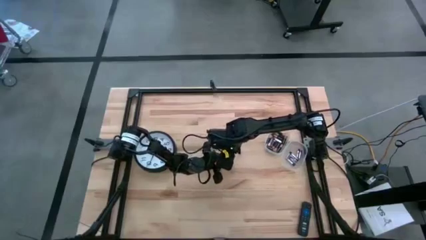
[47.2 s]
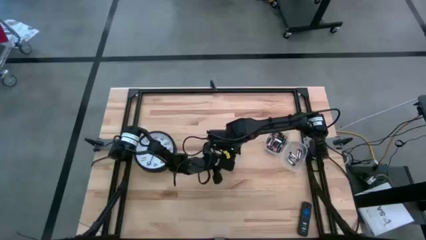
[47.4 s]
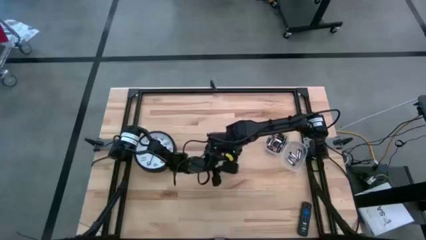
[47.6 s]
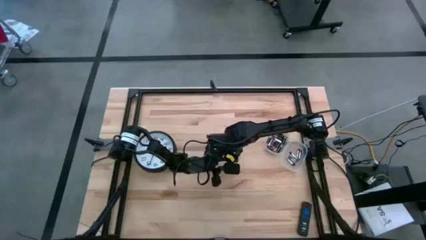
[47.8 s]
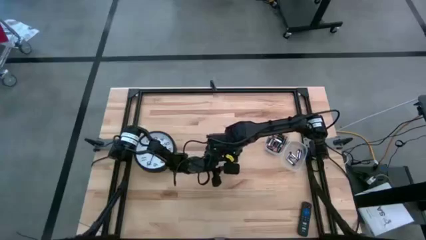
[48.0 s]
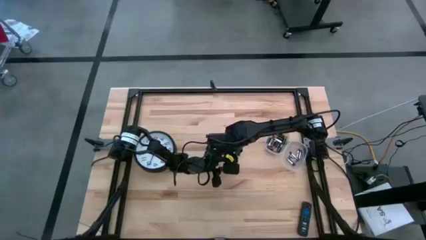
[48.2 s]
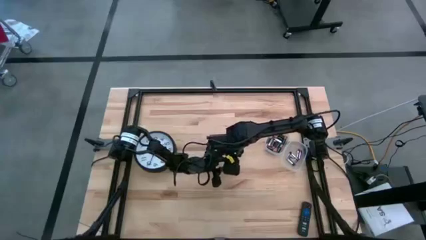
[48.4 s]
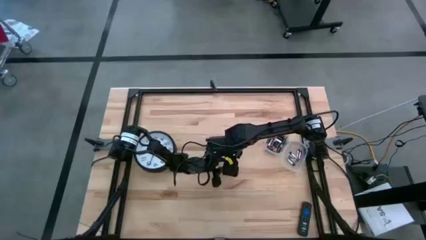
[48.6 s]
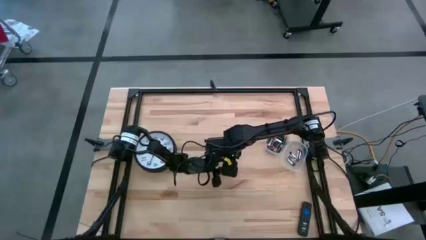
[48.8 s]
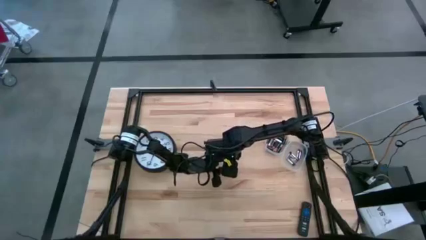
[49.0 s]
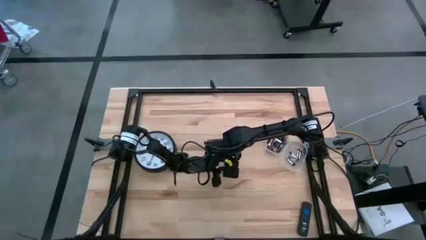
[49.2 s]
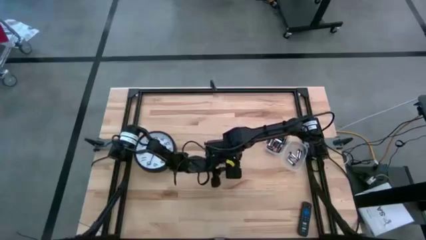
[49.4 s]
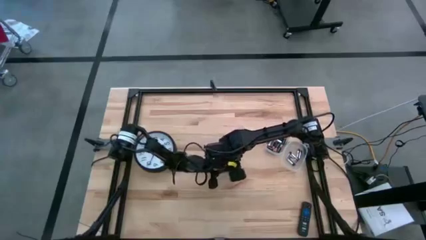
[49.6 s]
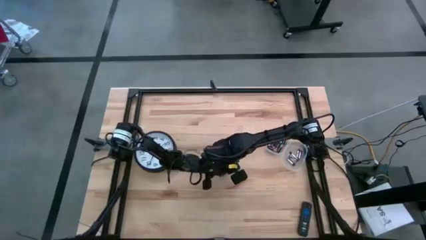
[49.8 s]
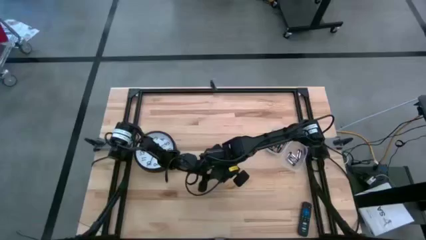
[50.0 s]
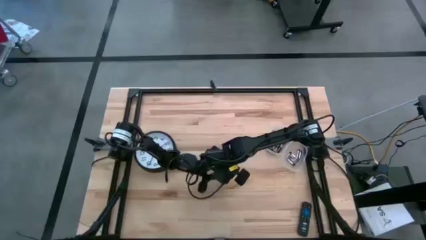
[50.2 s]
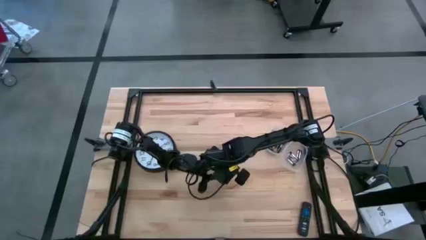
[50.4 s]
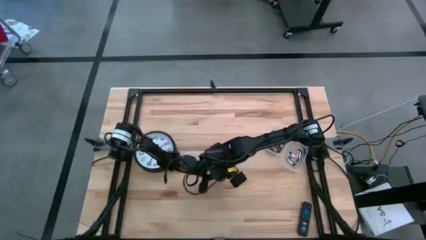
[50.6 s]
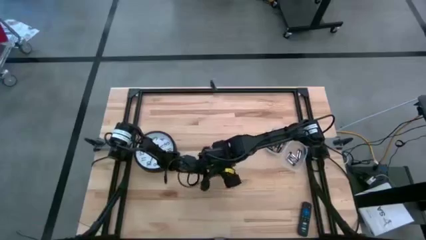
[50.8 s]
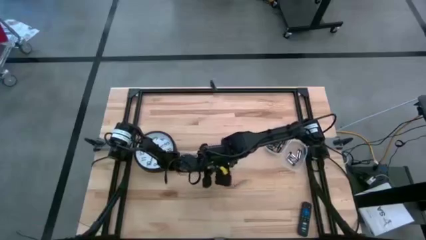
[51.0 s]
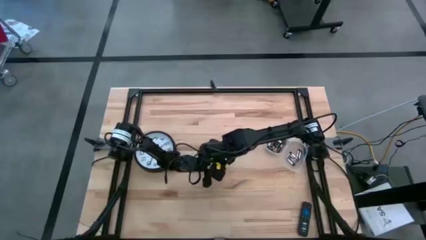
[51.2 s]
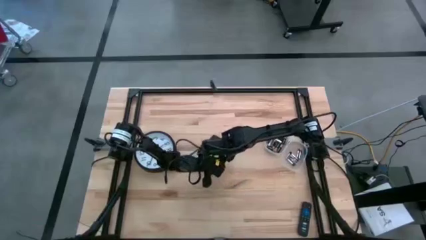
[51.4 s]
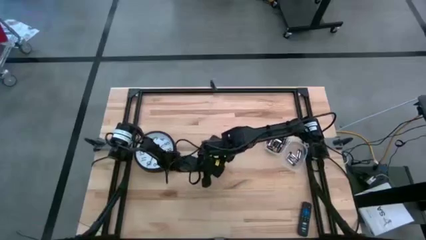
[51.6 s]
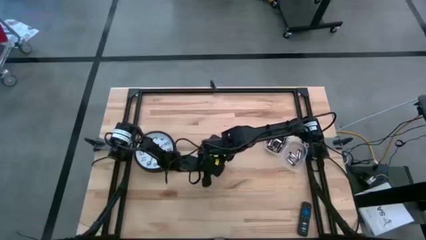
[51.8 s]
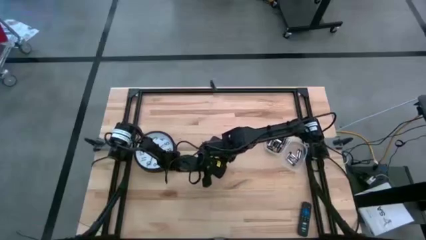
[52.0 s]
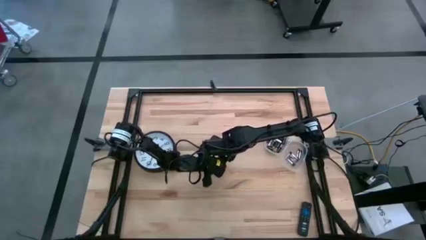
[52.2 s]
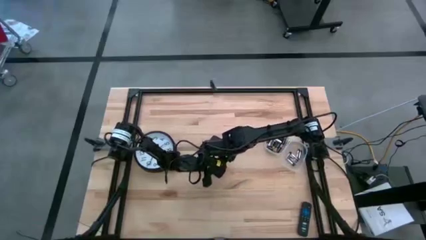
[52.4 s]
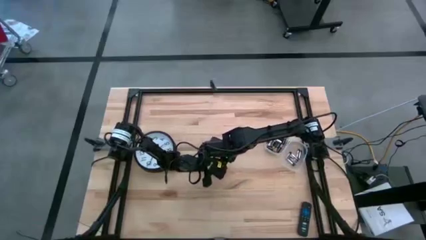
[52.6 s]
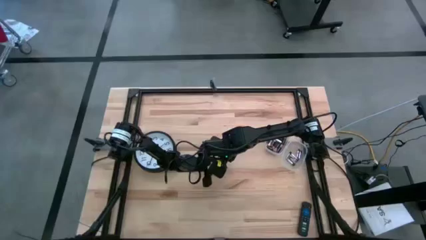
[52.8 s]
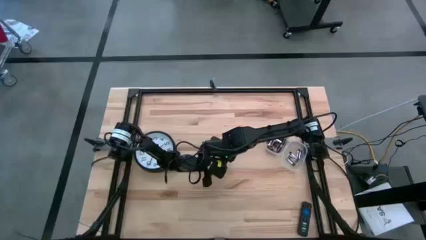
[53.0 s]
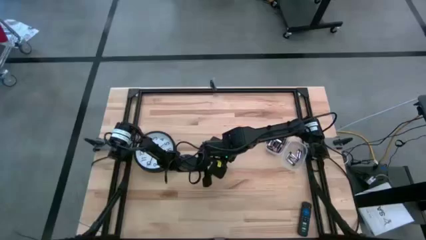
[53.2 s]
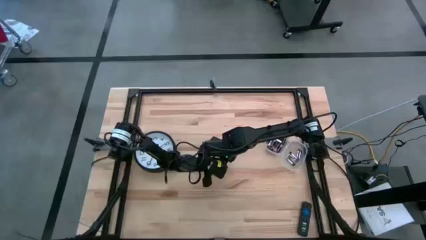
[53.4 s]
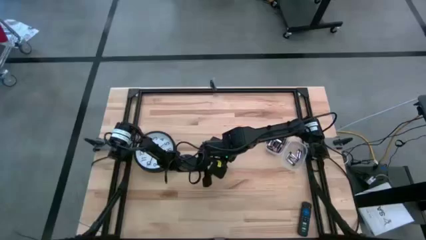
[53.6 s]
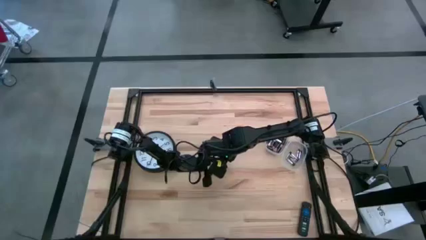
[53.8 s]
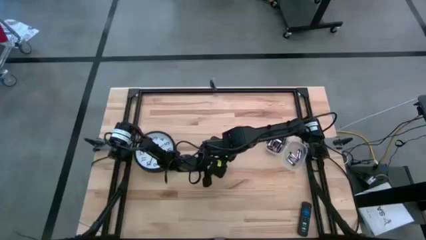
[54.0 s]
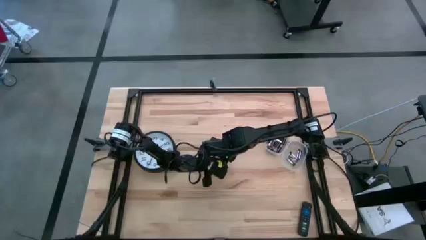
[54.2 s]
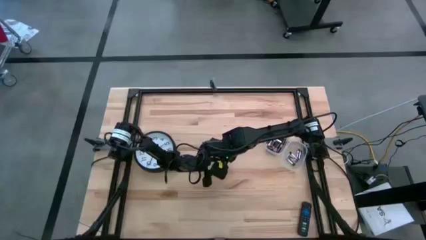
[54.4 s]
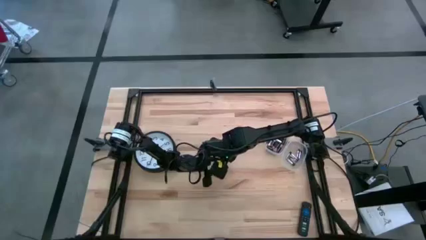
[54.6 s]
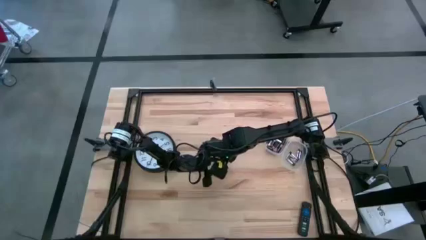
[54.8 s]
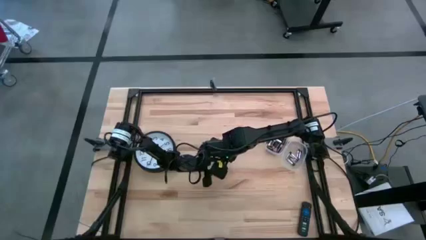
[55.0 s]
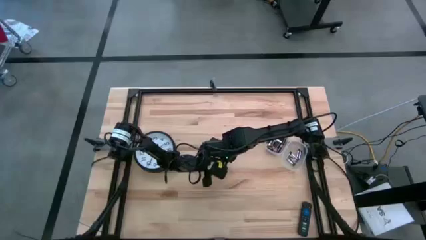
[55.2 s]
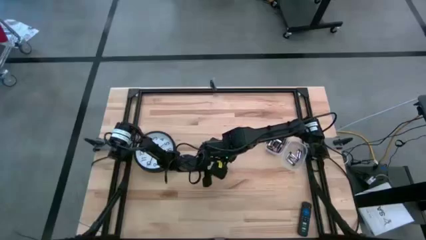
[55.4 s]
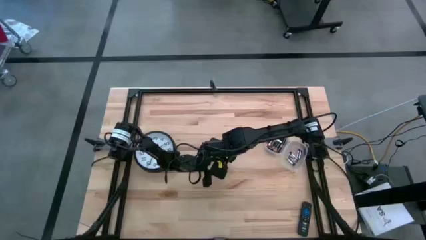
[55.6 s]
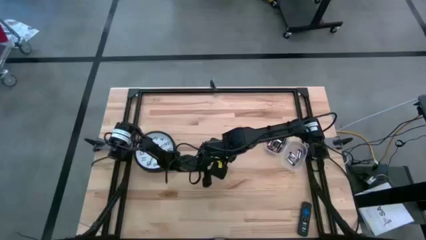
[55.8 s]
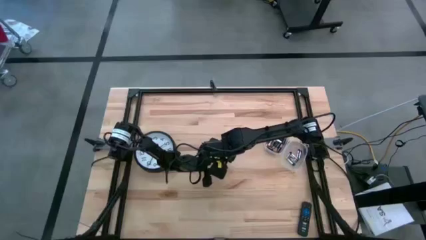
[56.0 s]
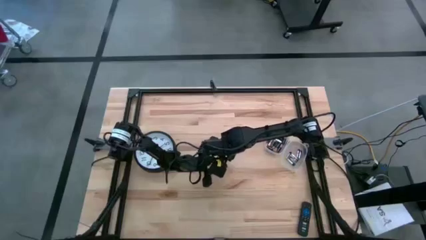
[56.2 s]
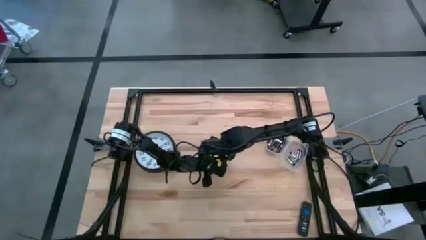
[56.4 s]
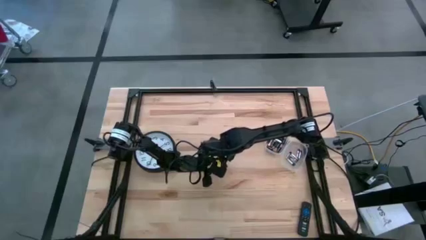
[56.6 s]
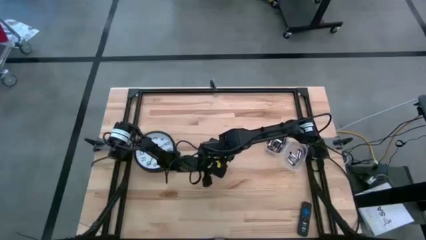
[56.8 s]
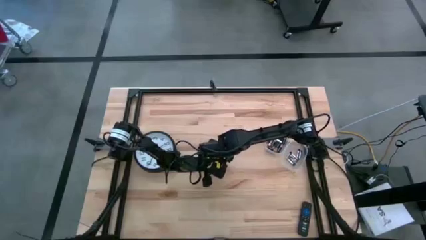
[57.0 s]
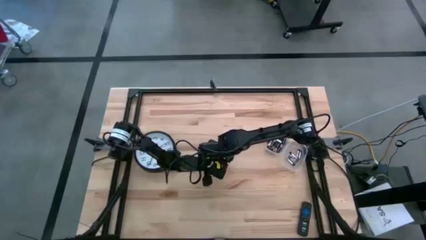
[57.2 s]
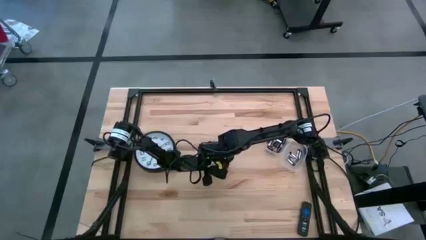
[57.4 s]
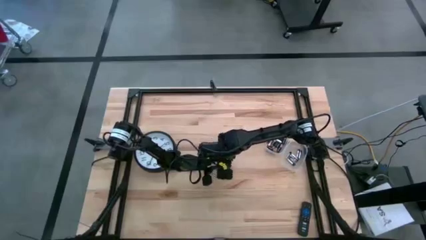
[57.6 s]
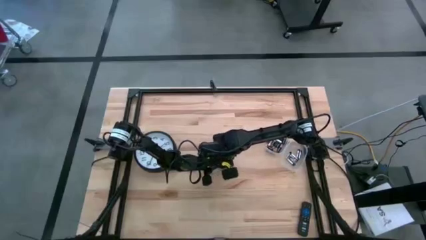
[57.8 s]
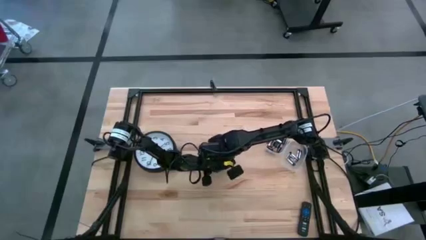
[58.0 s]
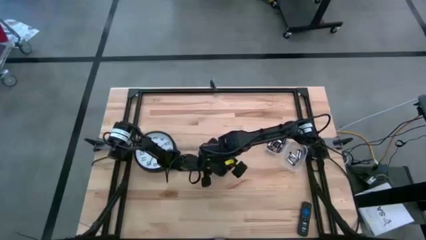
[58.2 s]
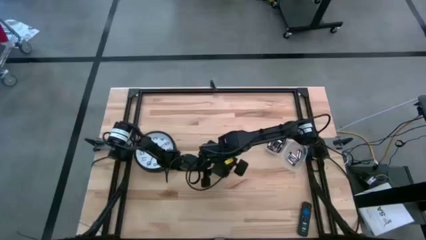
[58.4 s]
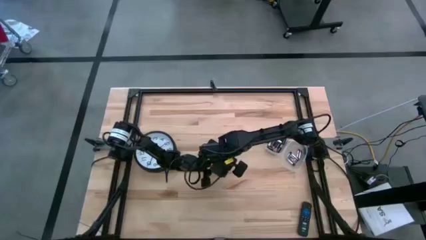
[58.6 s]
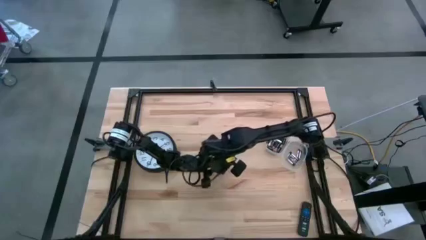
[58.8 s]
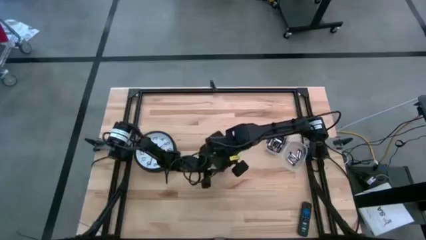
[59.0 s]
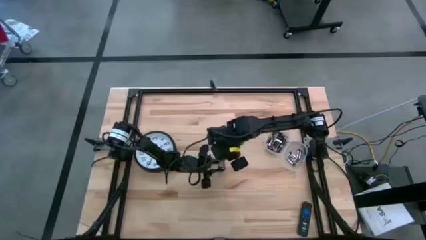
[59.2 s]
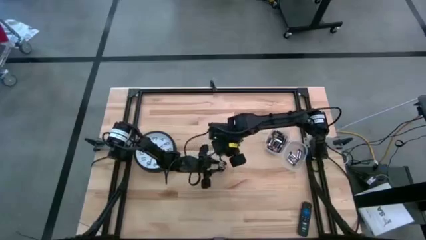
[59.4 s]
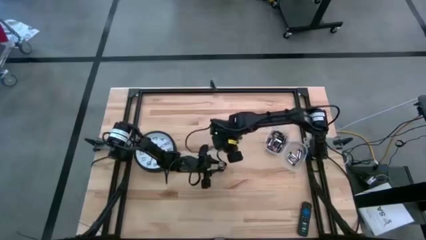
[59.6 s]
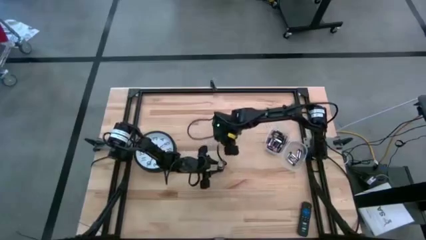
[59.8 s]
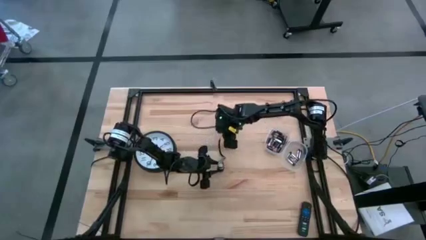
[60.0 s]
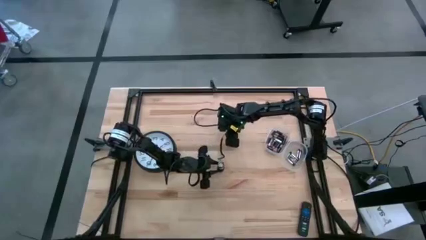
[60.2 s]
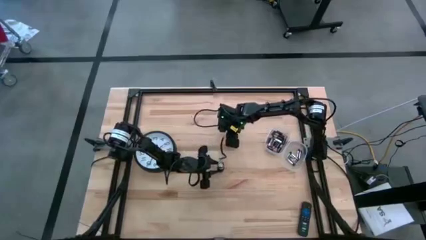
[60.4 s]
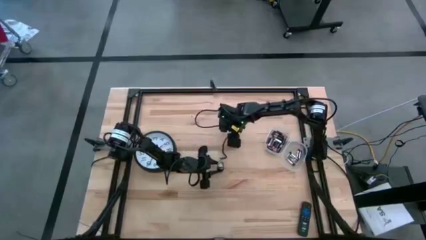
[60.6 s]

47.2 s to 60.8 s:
Task: Insert battery
Open the black flashlight battery compartment

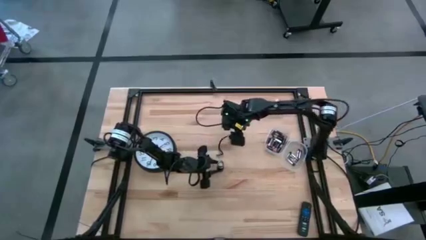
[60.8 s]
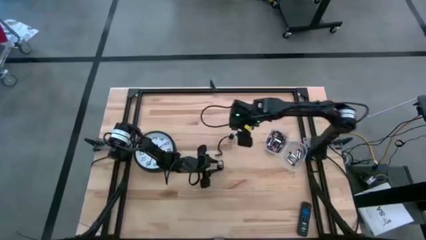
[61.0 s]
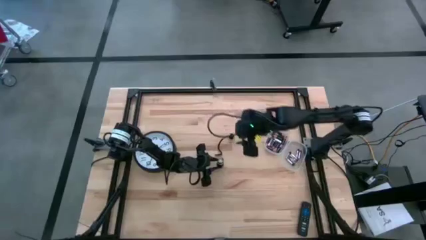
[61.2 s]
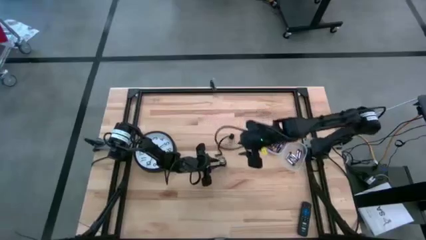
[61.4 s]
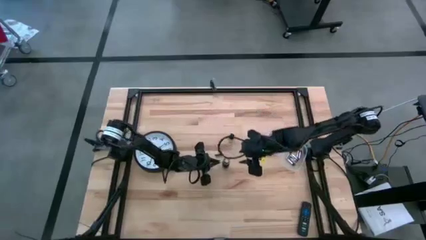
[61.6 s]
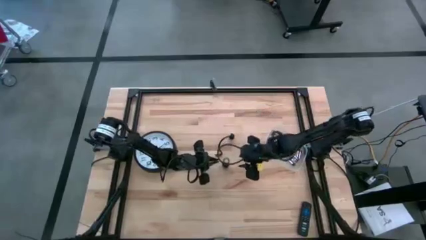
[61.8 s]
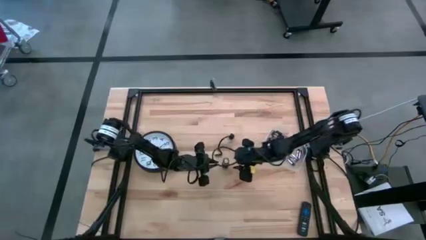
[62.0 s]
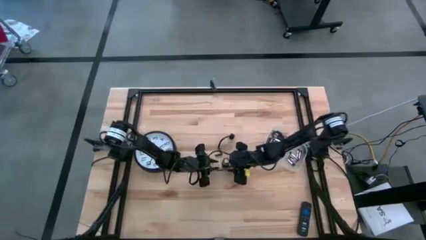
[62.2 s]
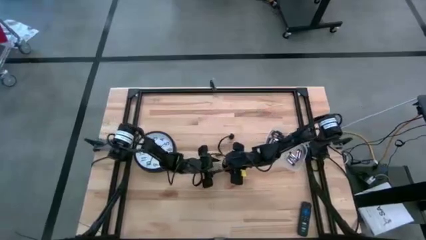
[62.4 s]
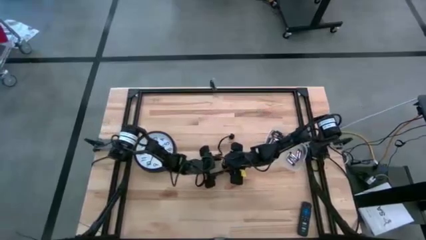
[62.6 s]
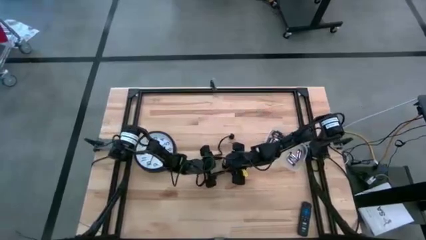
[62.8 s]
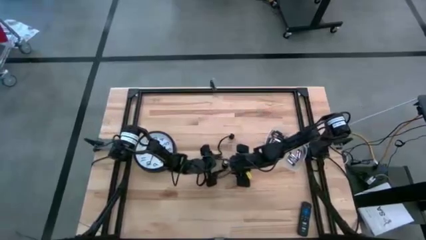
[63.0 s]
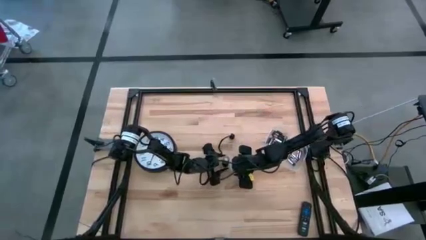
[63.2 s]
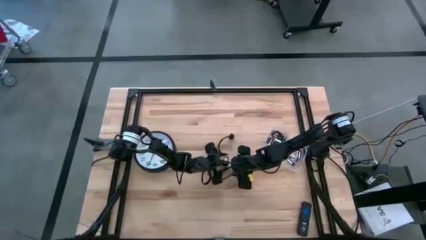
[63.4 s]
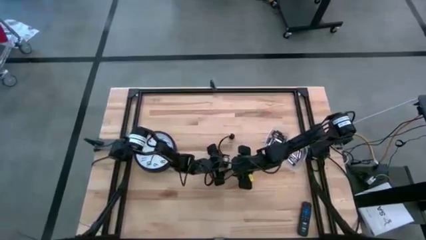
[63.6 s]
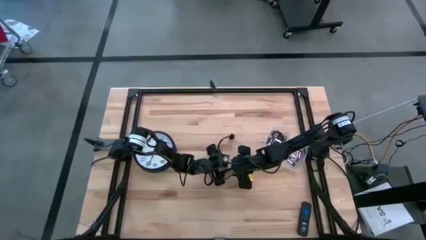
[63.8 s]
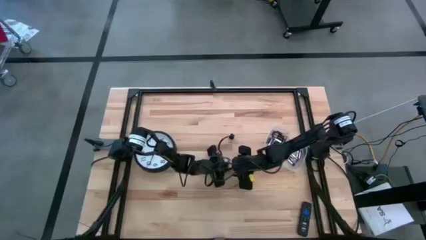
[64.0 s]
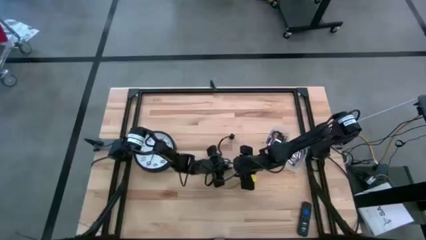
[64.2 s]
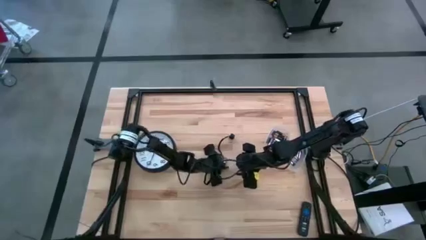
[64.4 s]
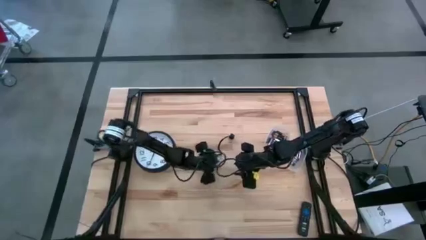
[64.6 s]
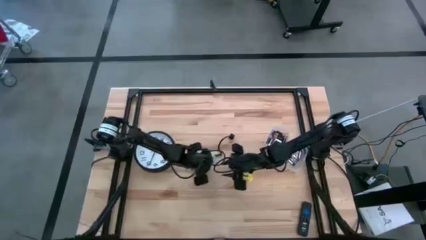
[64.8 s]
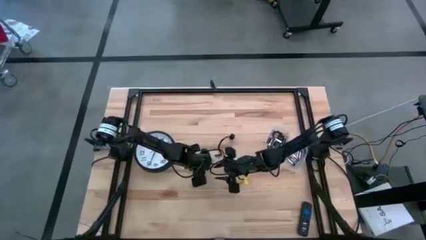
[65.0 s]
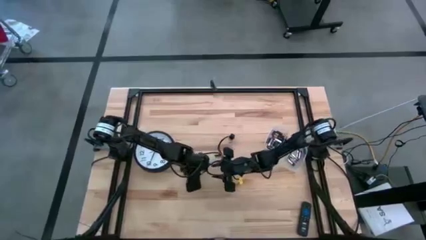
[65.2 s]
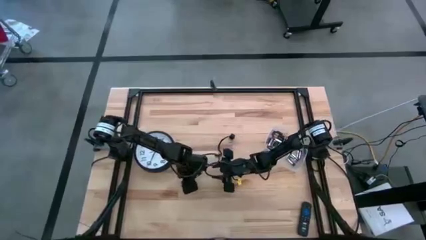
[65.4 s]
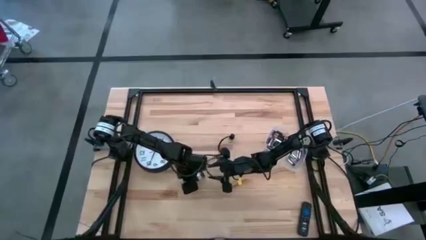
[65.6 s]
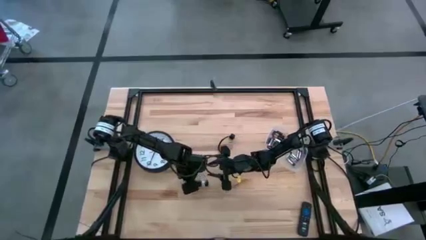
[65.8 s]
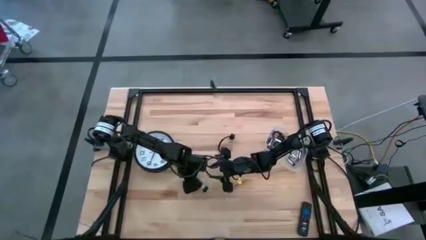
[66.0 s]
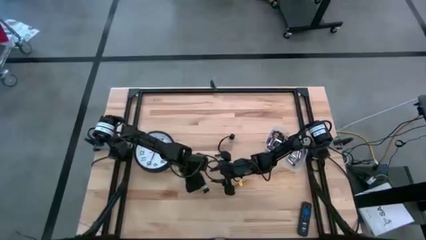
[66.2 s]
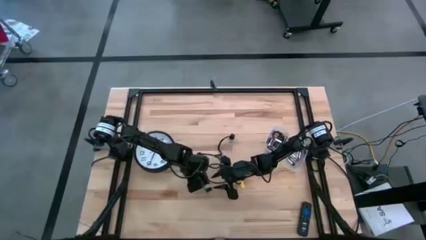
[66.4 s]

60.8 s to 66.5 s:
Remove the white battery holder
